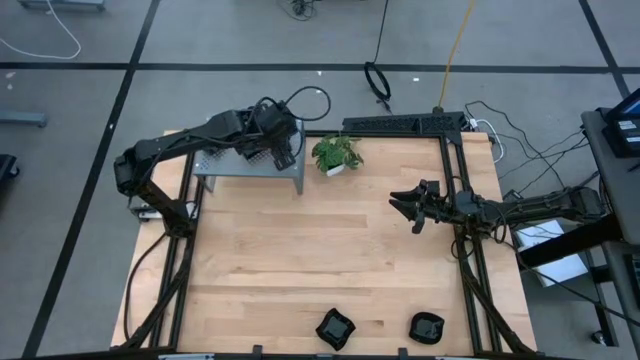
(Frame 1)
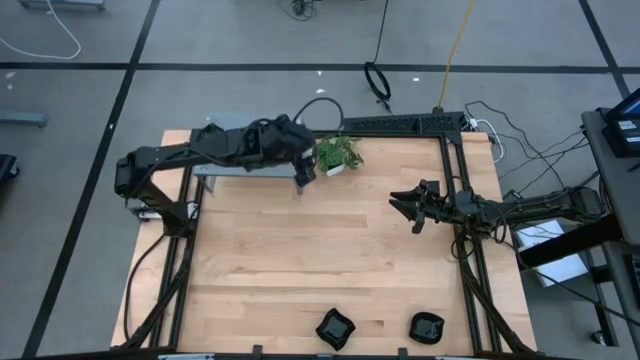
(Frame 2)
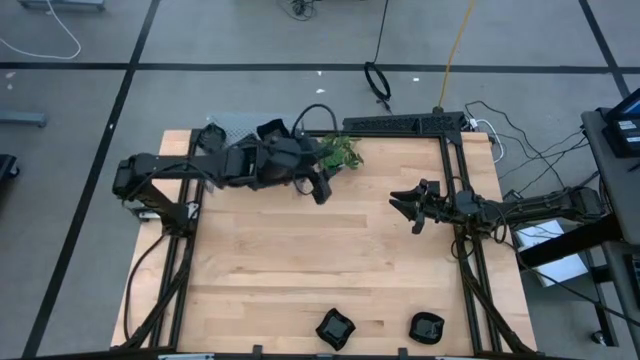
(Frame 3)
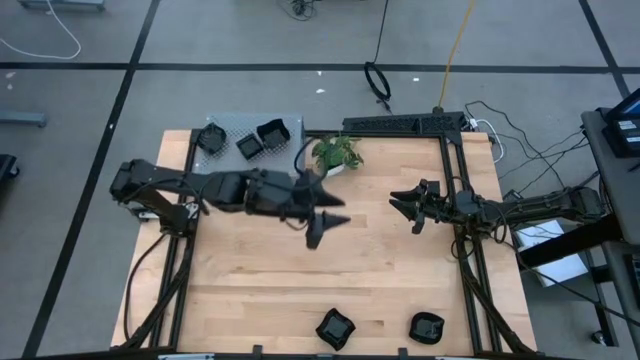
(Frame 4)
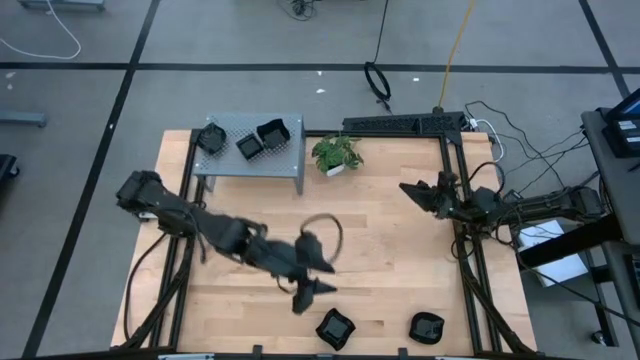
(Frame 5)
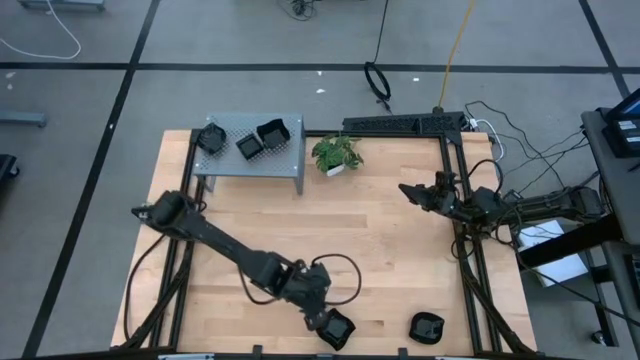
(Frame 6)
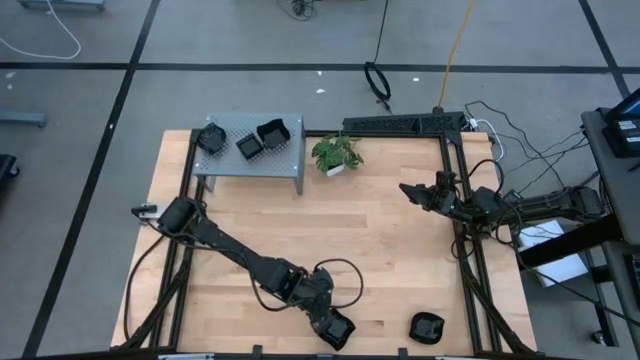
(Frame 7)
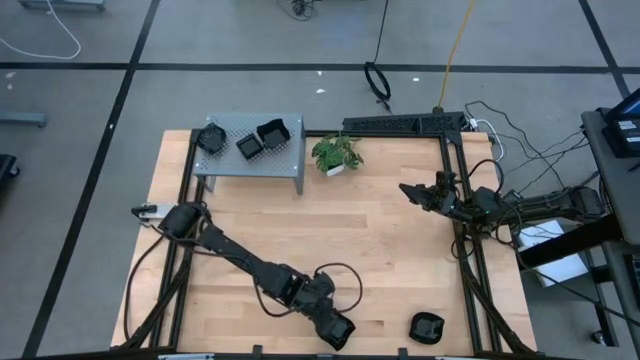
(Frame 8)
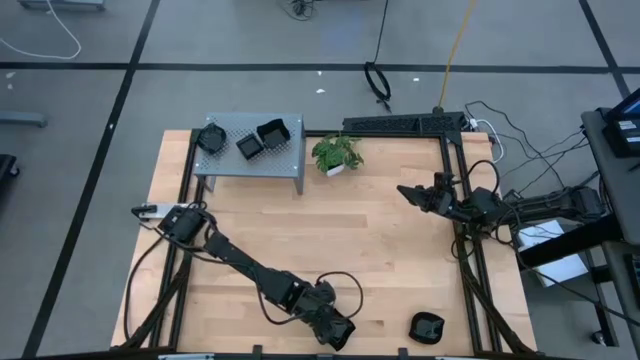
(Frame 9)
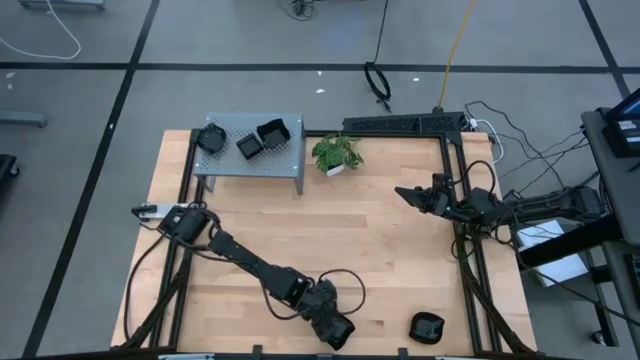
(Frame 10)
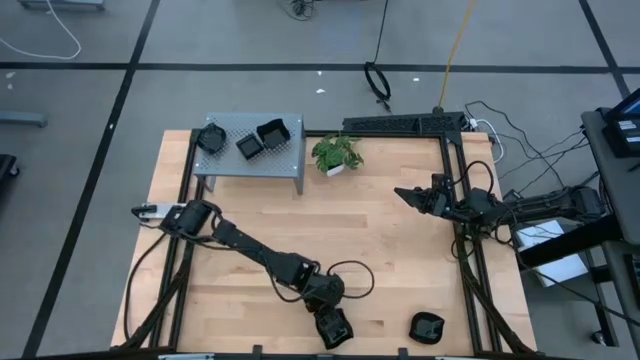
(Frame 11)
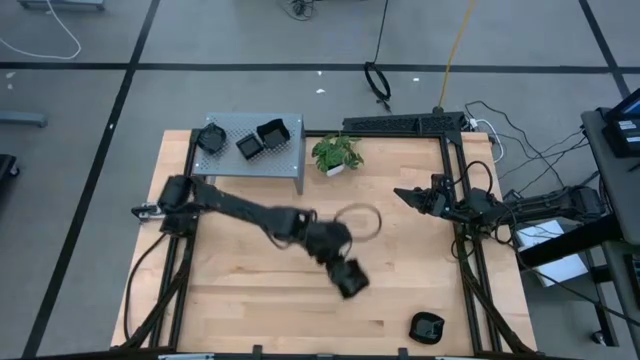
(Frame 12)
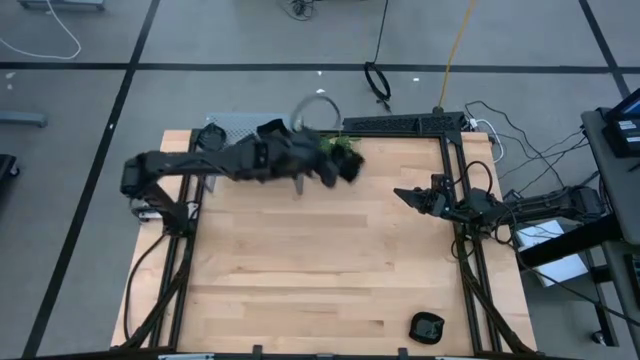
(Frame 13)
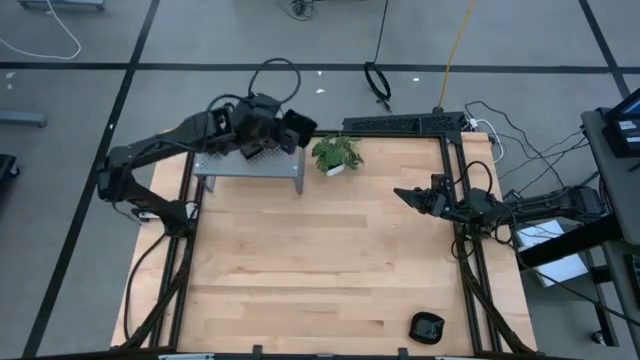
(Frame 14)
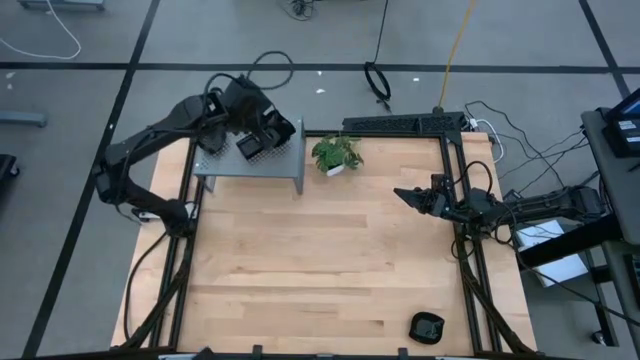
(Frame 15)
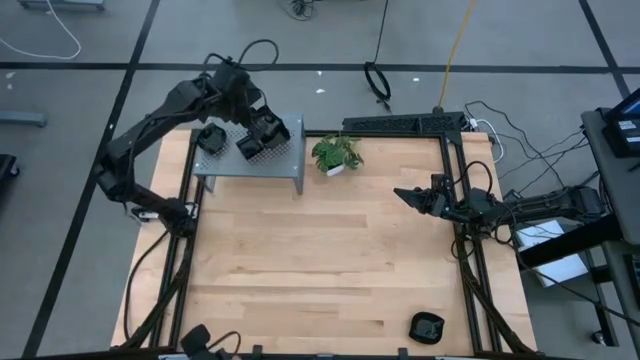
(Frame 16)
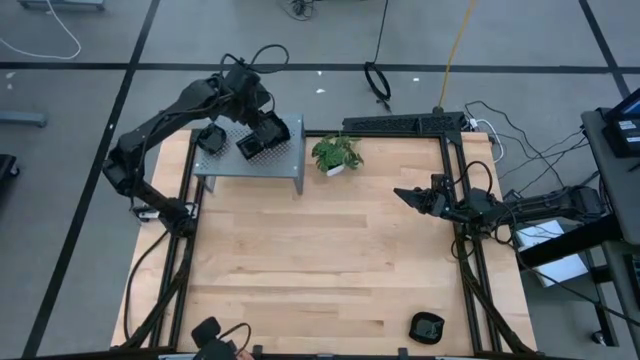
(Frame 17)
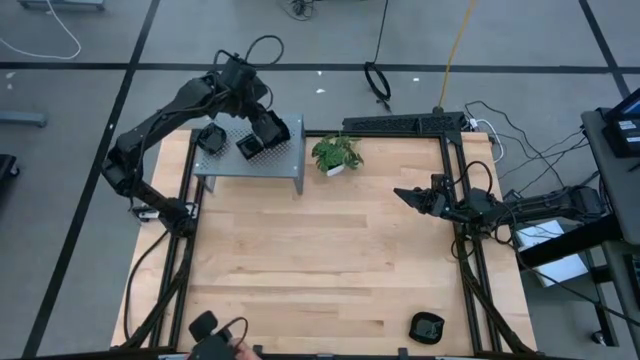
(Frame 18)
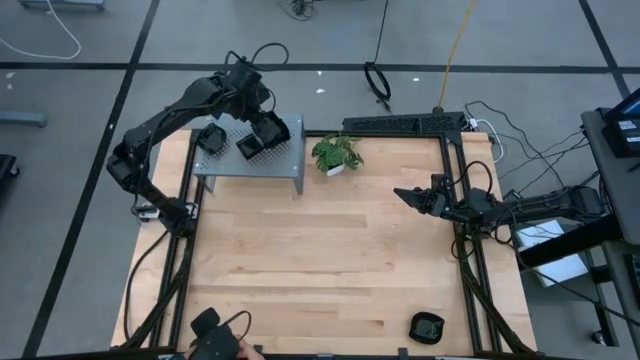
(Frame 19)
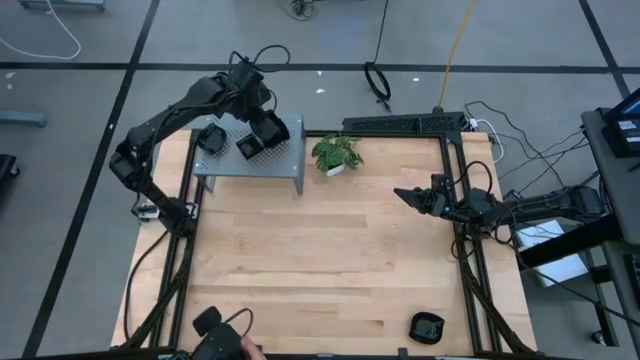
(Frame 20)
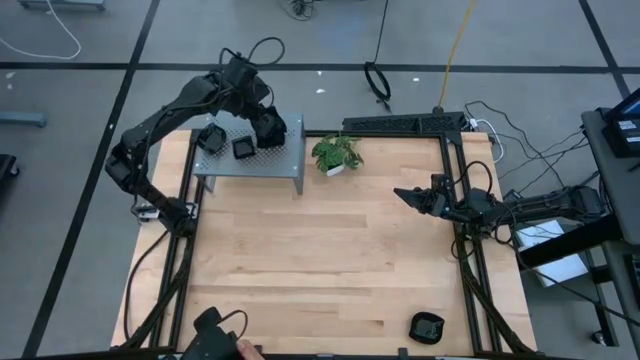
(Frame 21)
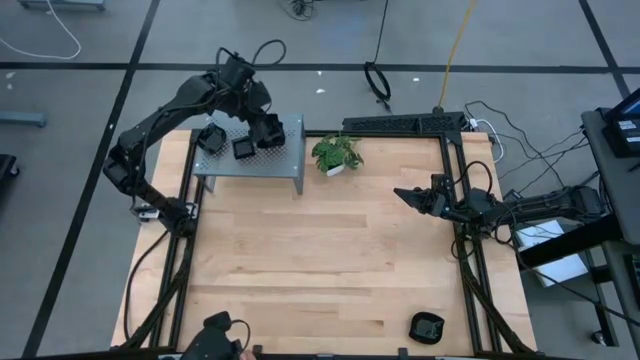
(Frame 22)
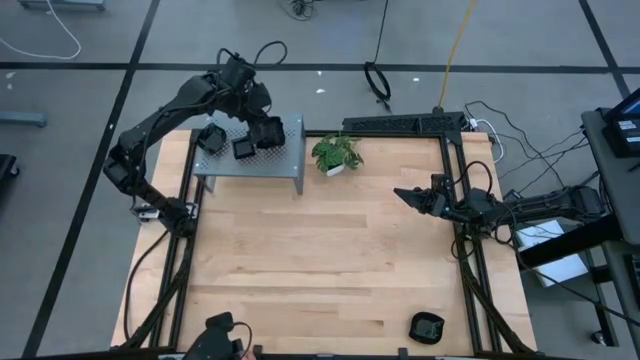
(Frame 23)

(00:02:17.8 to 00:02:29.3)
Task: Pick & Place Mini shaped plates
Stack the black distorted square plate on top of the other black distorted squares plate on the shelf

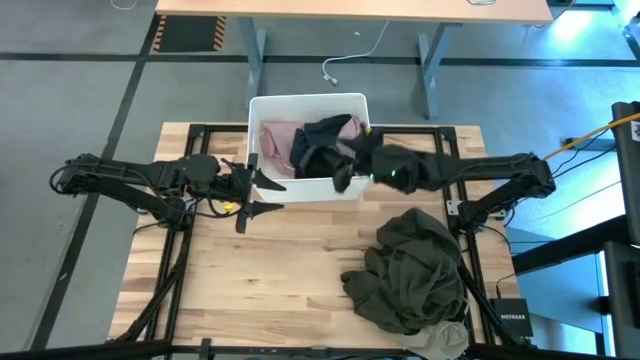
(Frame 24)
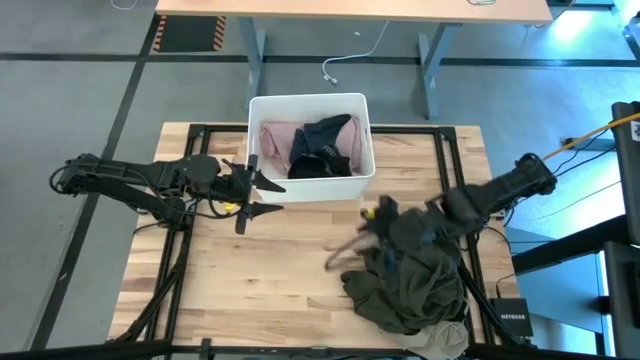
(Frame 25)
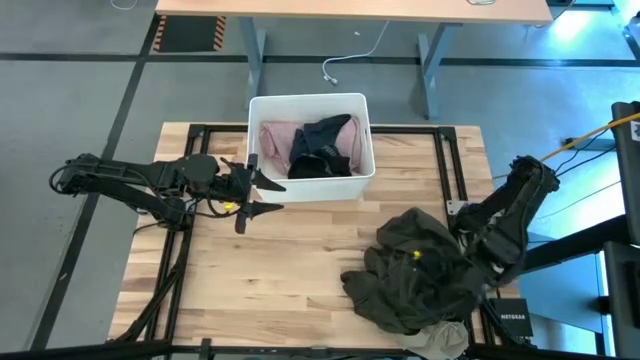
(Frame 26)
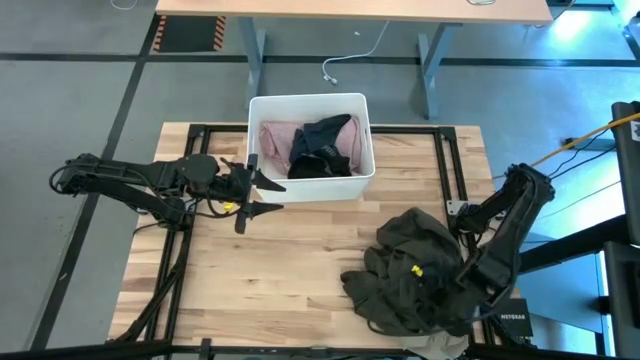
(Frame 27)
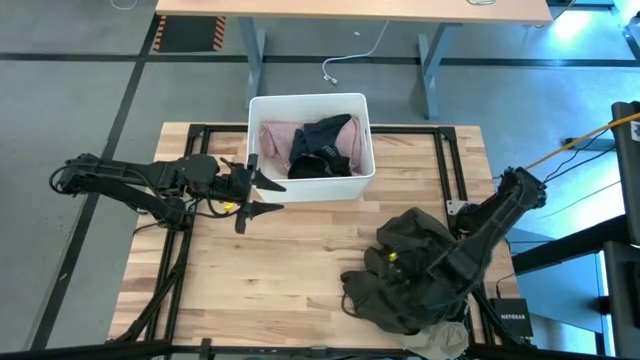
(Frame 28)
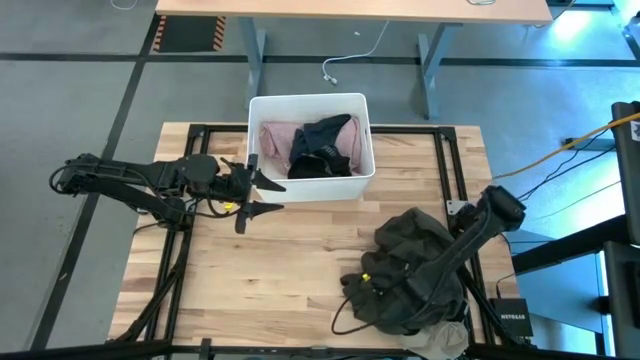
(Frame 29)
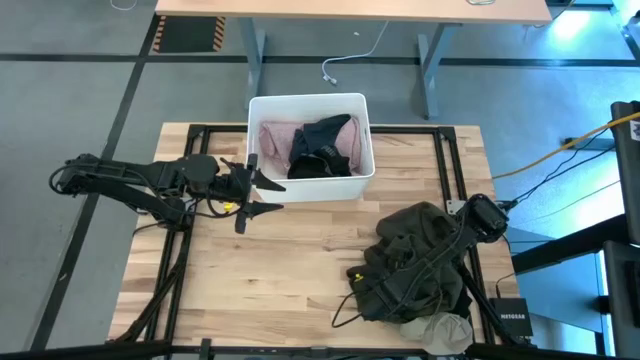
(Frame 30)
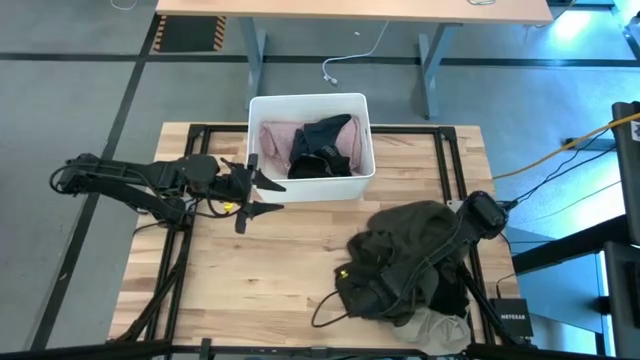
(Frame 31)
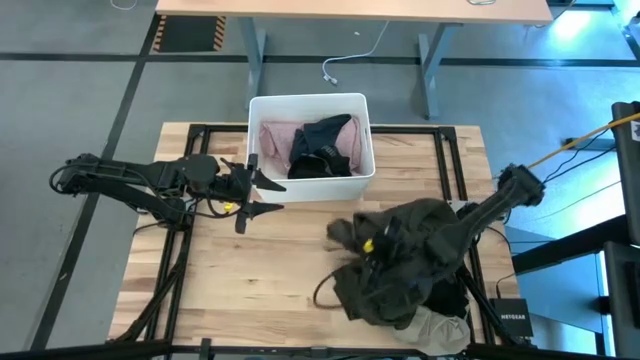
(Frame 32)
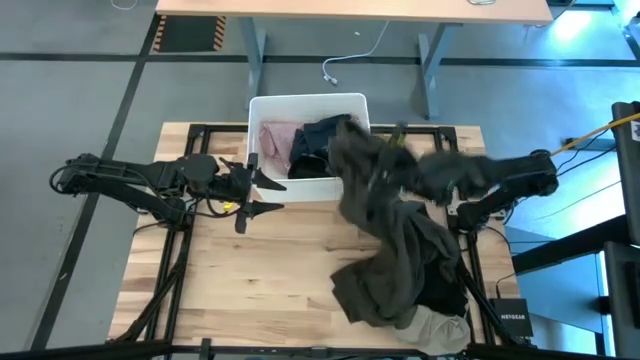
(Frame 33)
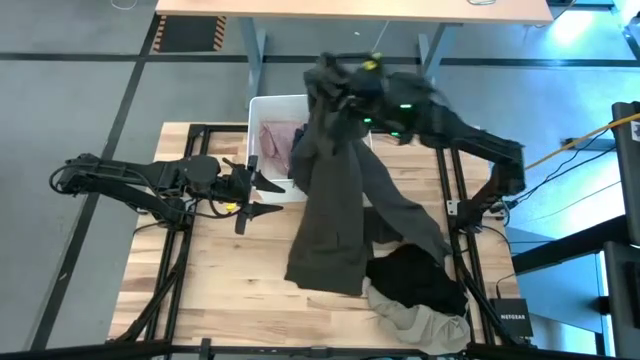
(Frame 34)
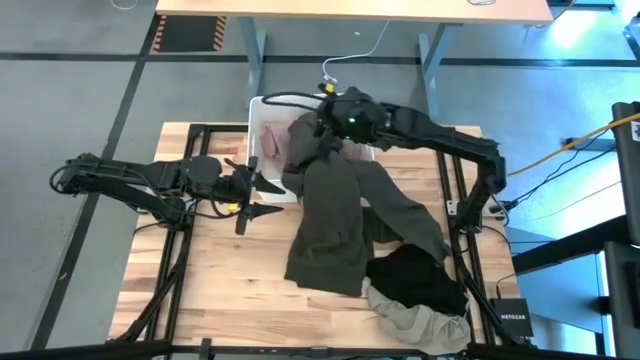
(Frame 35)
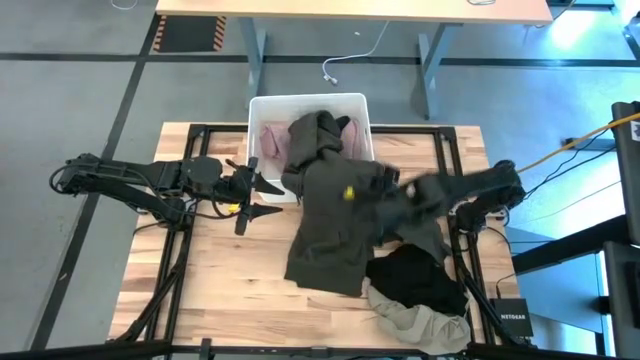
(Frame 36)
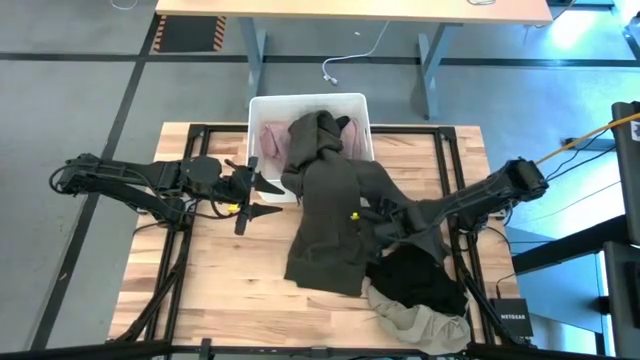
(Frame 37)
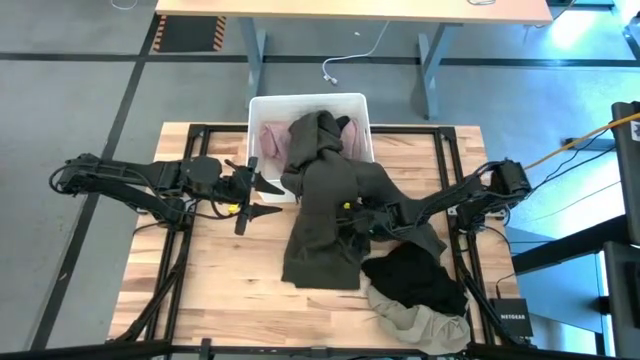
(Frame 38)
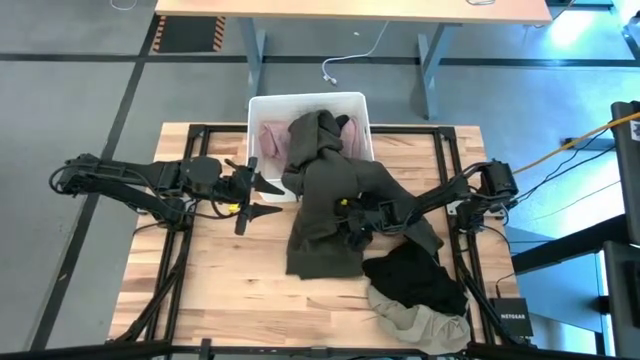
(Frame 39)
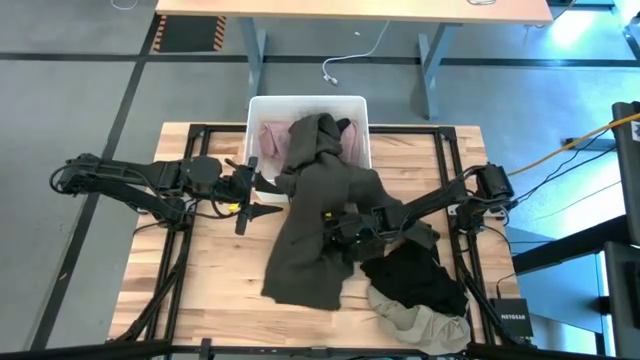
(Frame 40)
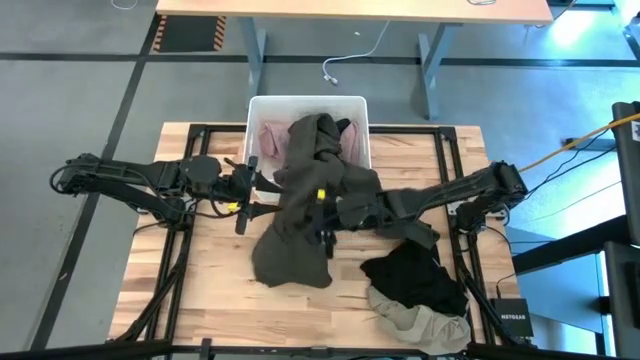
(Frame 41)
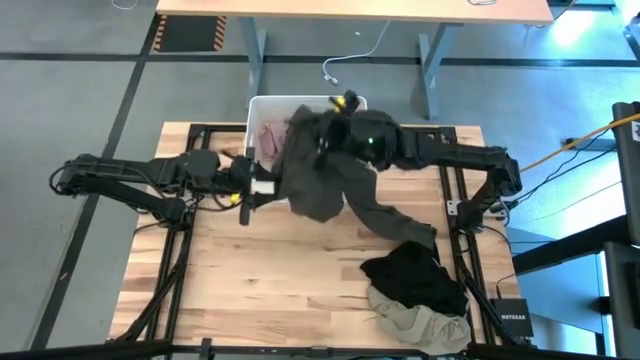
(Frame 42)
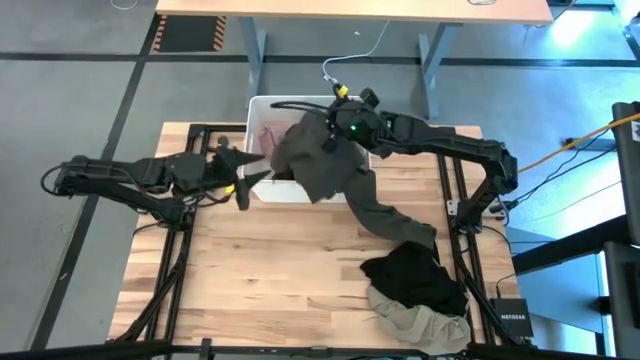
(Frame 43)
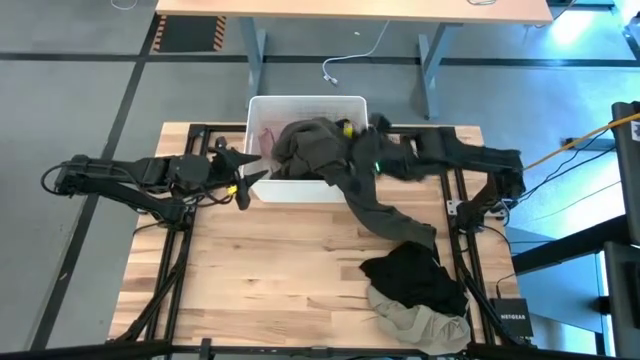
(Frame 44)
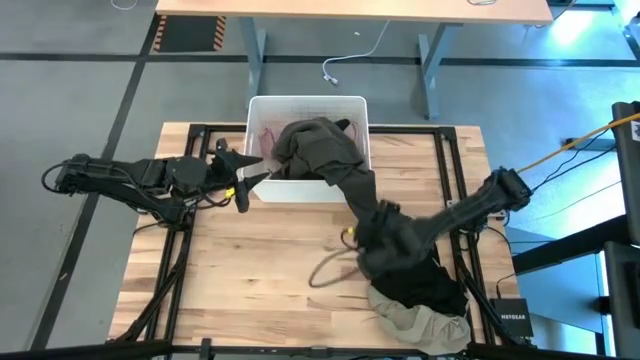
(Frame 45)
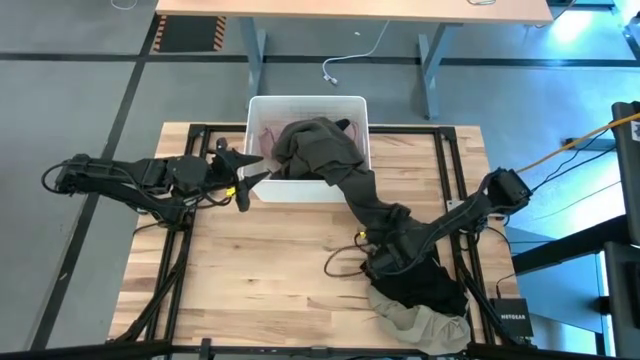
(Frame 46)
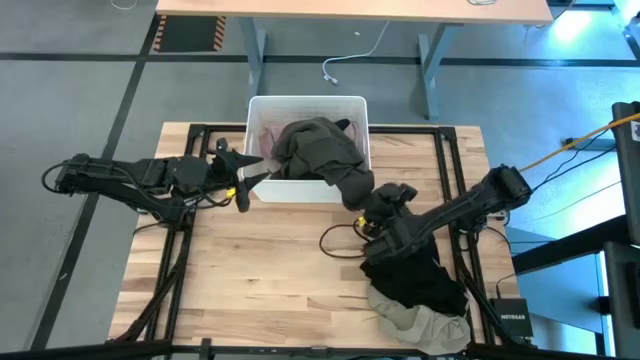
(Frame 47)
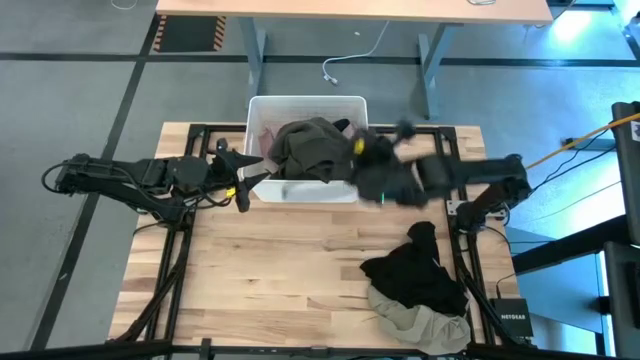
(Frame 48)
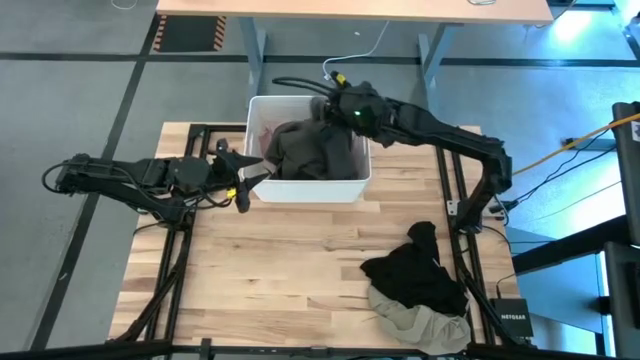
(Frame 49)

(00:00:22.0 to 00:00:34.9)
Task: Sort clothes
Put the black jacket into the white laundry bin
